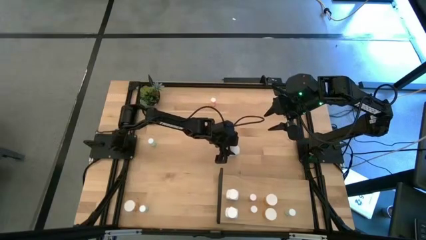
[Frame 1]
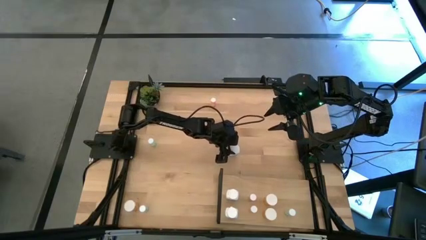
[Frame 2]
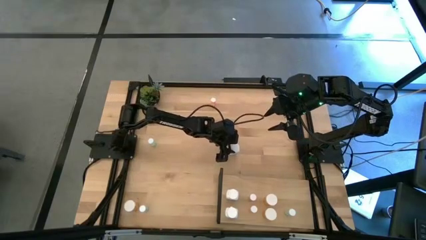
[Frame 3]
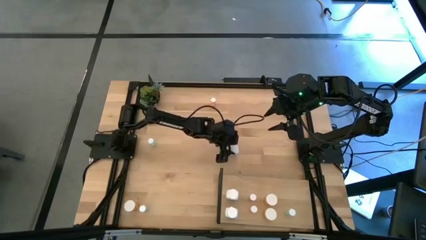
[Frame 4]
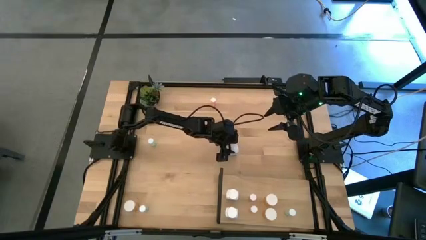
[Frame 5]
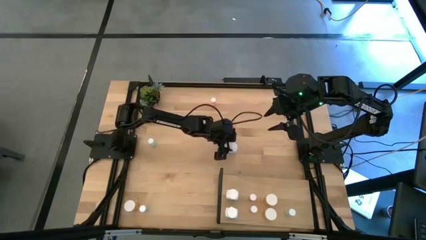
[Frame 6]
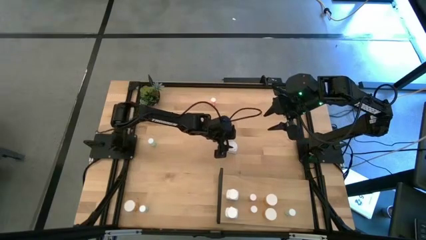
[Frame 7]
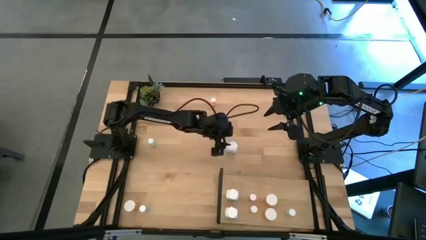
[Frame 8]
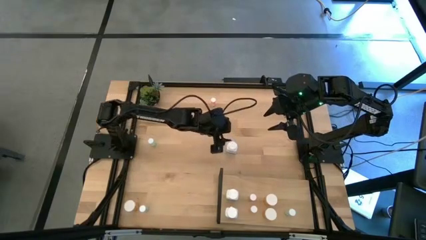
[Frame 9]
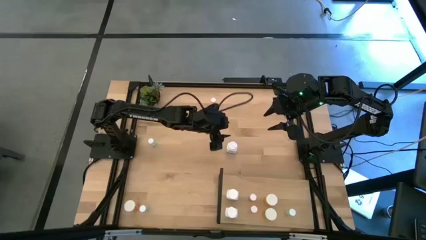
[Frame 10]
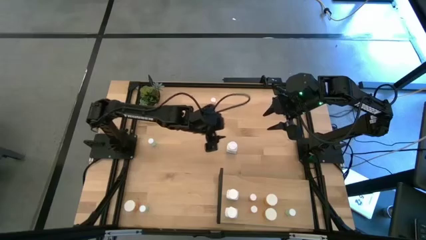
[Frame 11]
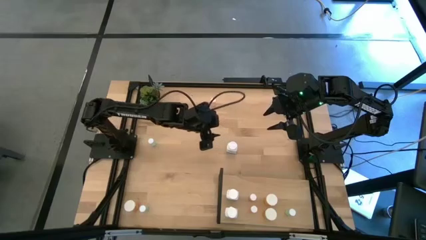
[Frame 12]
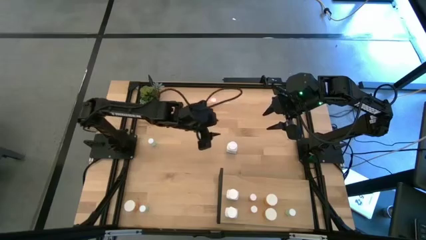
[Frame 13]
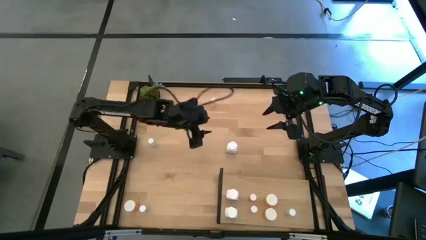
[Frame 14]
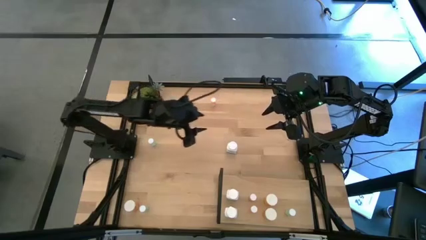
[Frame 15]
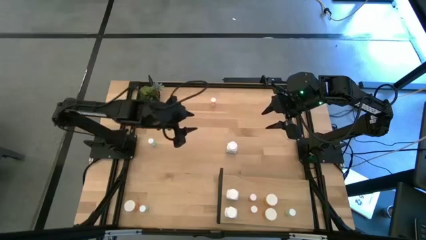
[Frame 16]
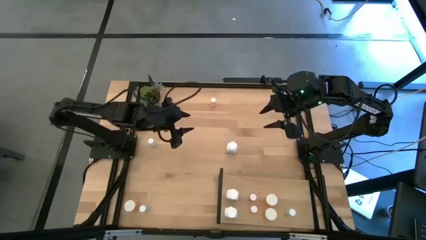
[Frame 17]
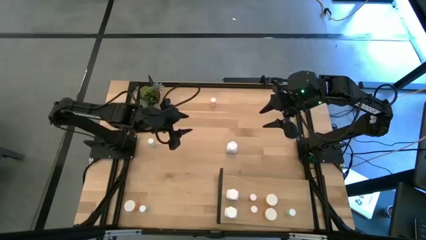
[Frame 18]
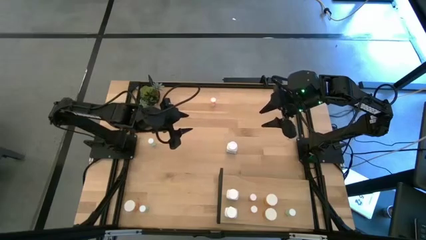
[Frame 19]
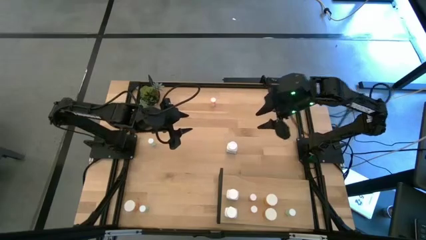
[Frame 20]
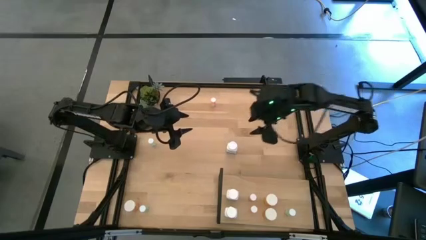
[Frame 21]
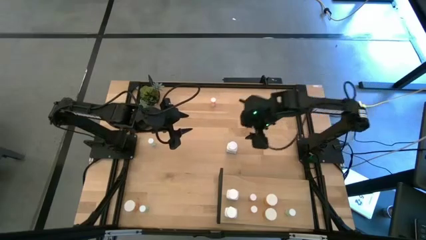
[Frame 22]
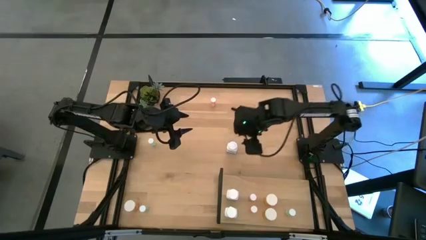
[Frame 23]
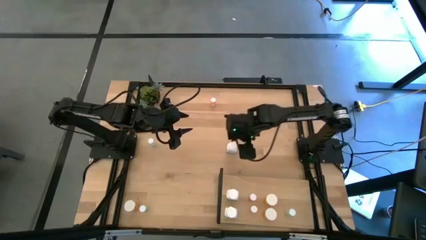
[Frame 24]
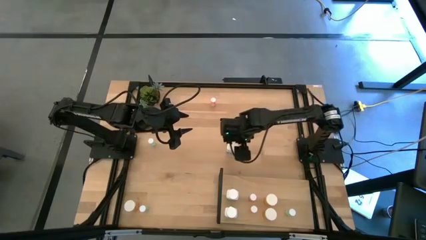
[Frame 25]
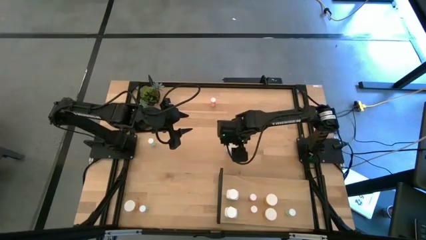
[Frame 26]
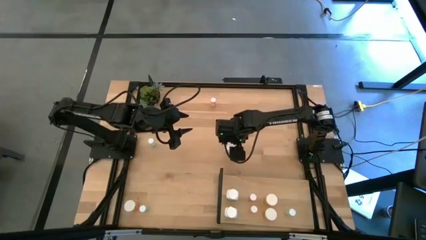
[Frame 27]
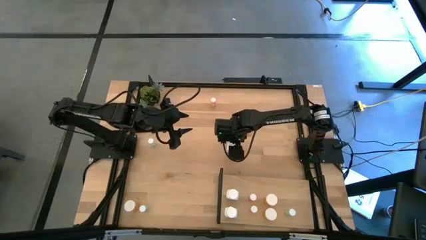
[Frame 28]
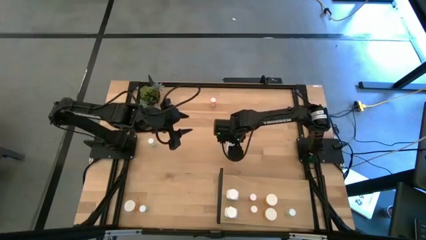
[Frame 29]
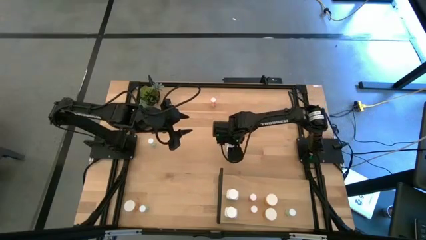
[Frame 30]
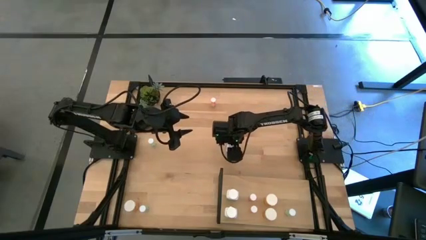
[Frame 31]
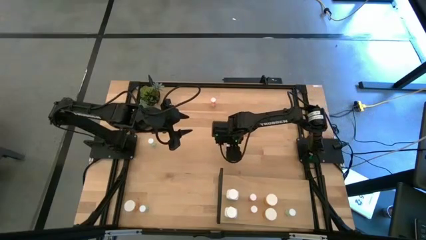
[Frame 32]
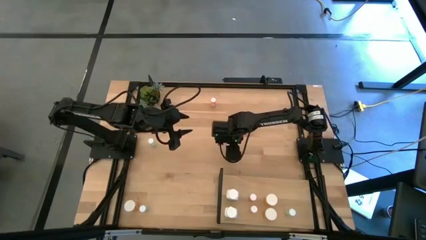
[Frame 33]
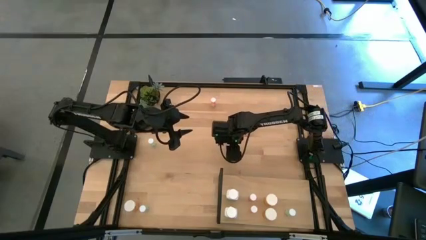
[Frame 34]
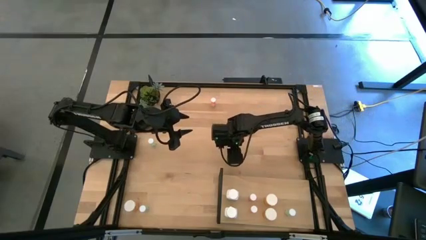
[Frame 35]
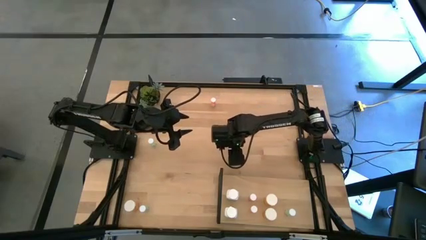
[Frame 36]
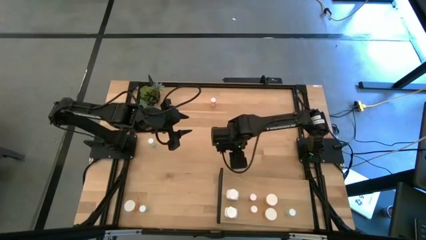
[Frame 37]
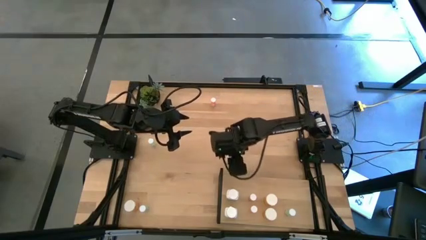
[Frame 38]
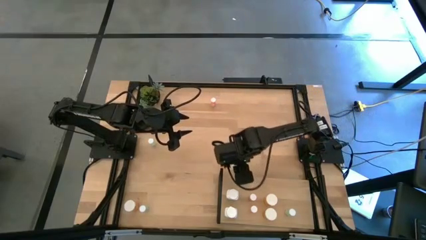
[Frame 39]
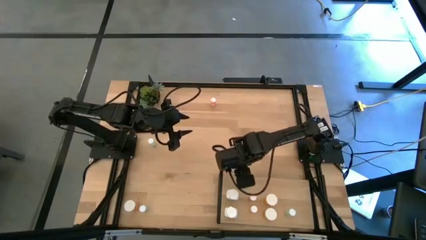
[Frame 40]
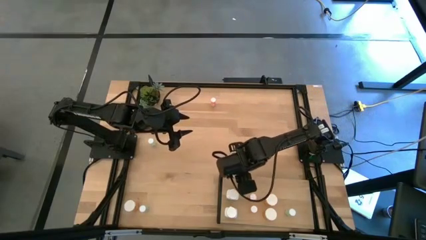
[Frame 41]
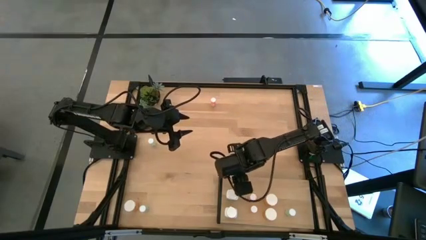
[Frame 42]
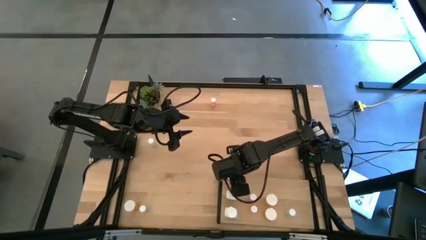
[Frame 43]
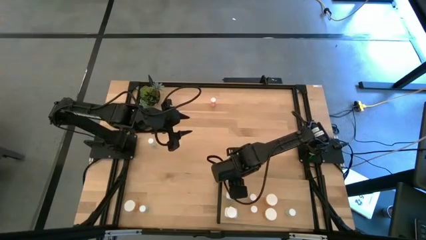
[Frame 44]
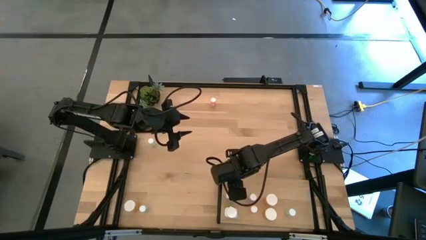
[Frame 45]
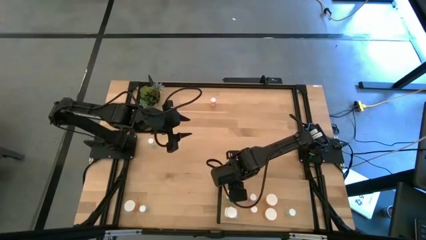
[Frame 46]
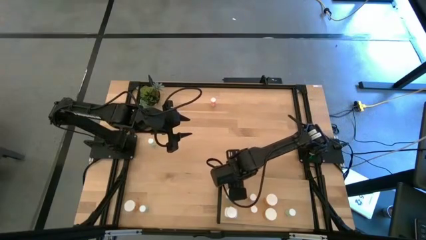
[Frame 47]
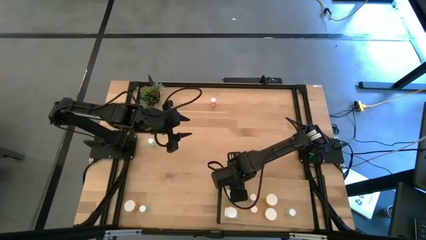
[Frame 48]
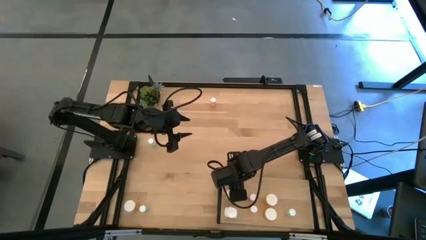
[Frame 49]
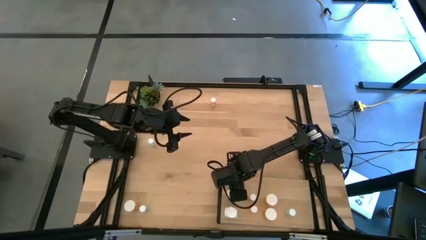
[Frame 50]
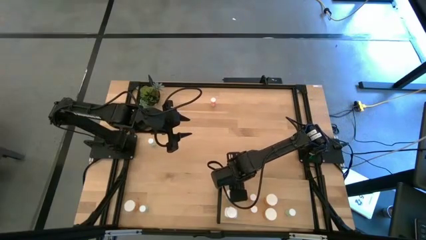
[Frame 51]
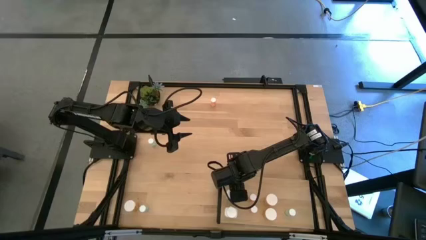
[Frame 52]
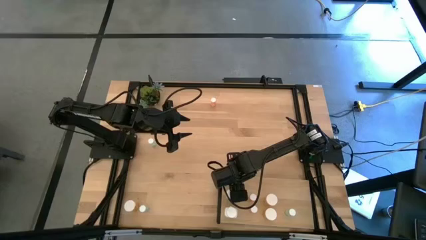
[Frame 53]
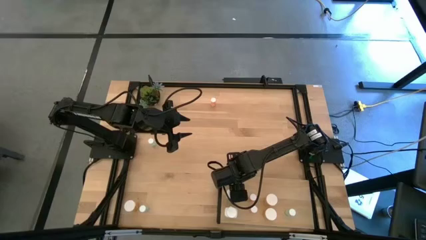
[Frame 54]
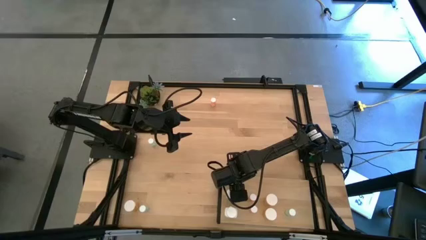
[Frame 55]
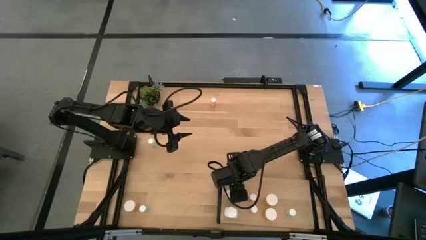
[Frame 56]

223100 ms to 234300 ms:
Task: Pick and place medicine bottles onto shelf by color
Put the top white pill bottle on the shelf
